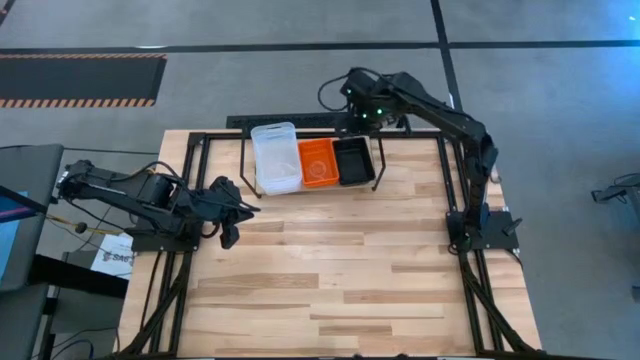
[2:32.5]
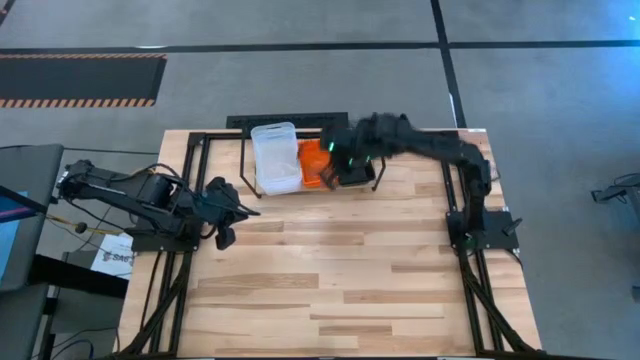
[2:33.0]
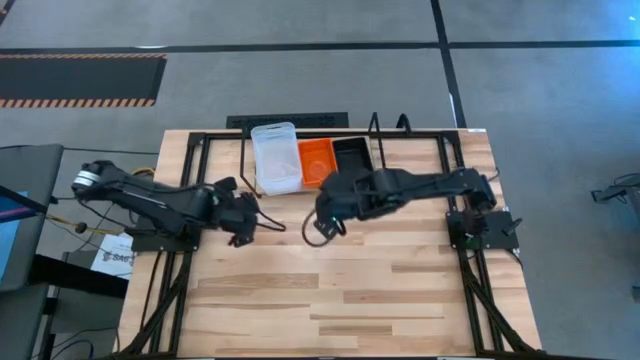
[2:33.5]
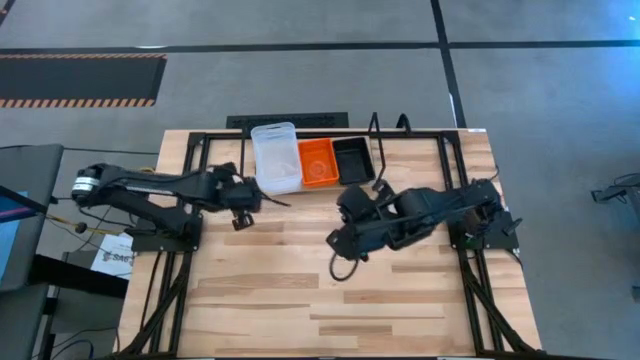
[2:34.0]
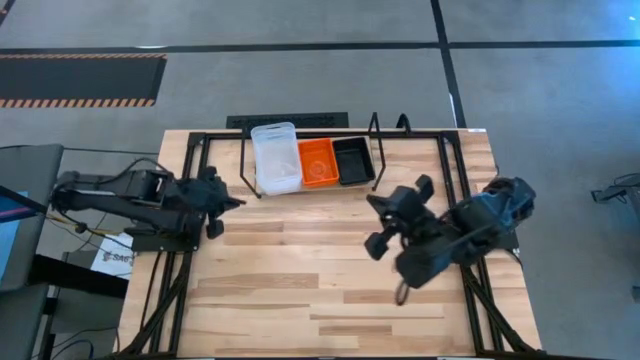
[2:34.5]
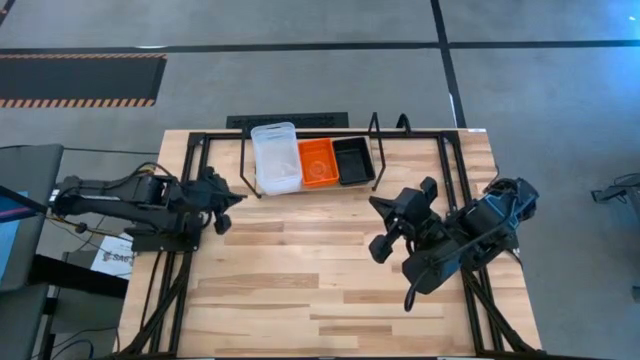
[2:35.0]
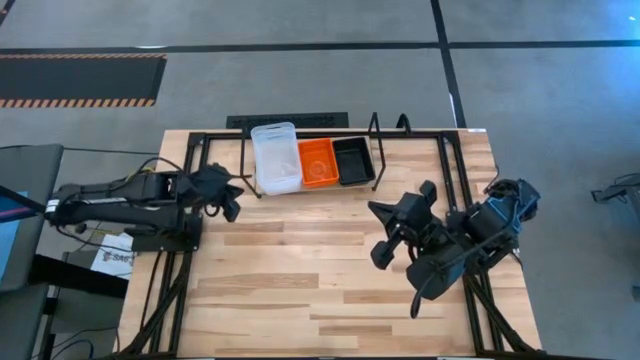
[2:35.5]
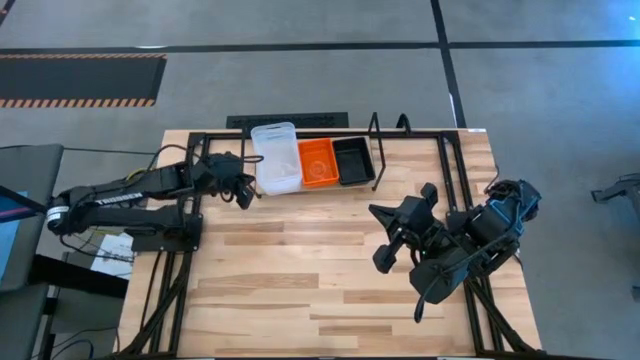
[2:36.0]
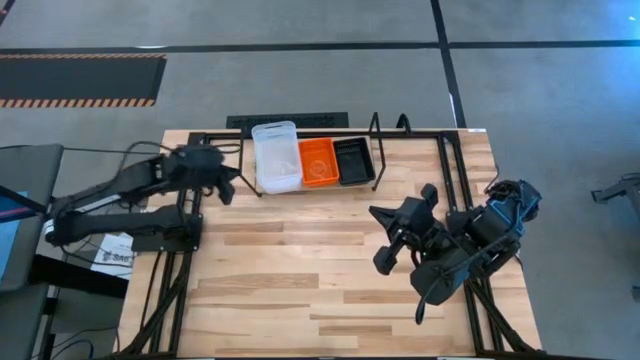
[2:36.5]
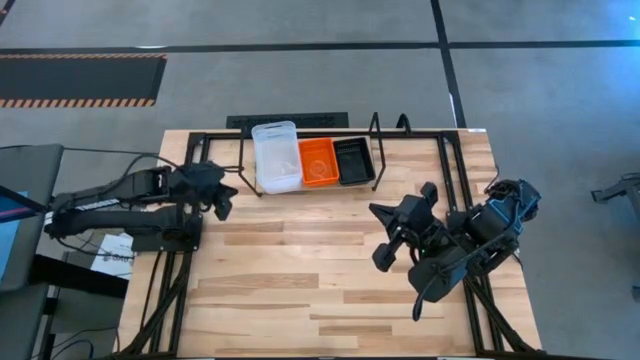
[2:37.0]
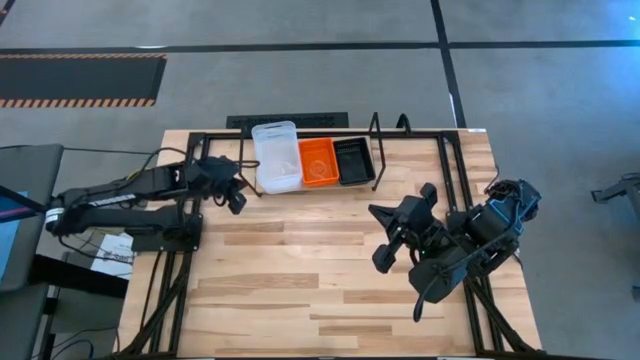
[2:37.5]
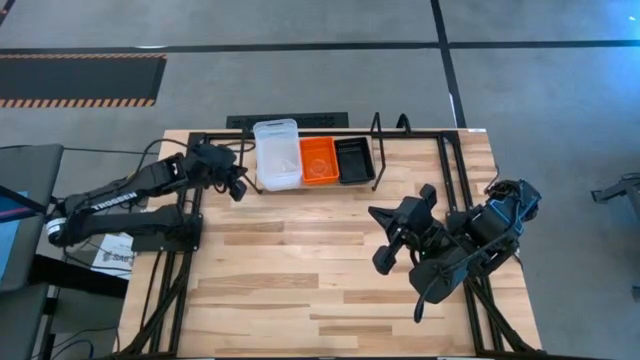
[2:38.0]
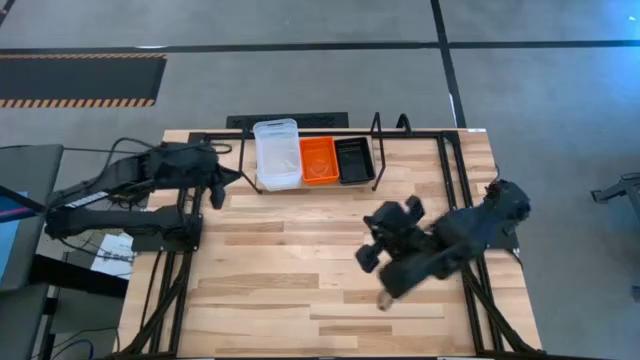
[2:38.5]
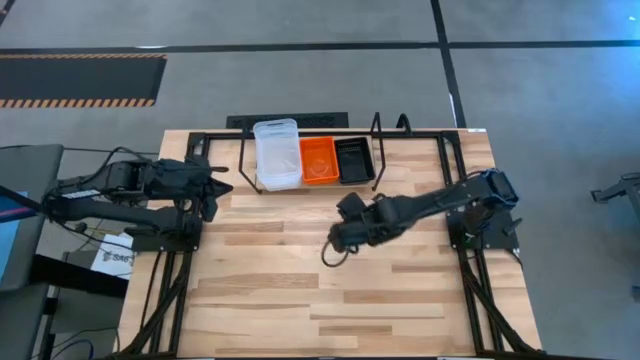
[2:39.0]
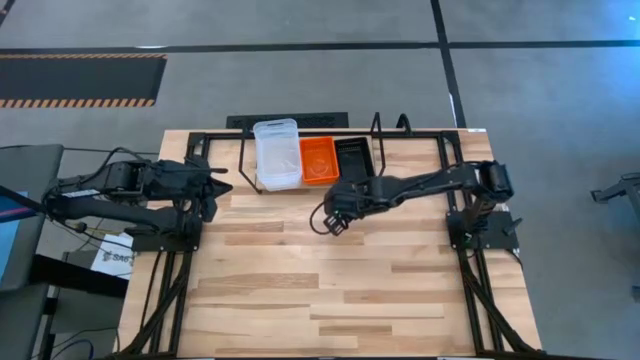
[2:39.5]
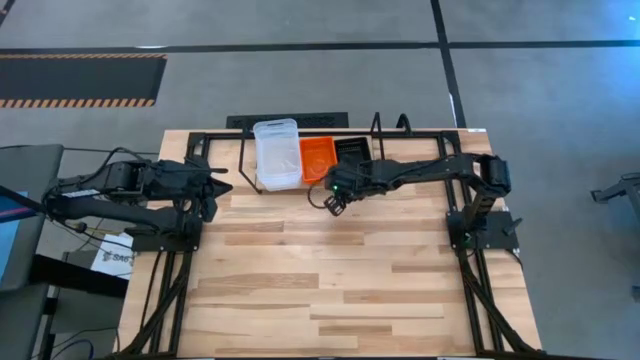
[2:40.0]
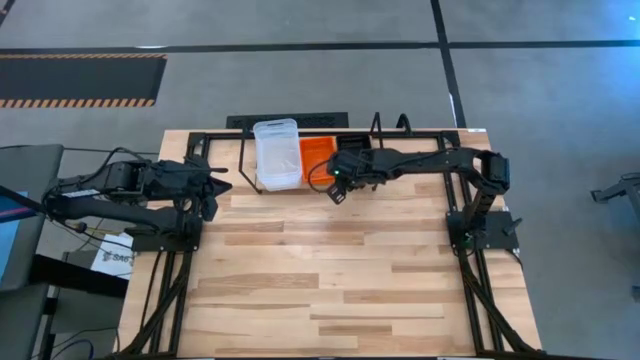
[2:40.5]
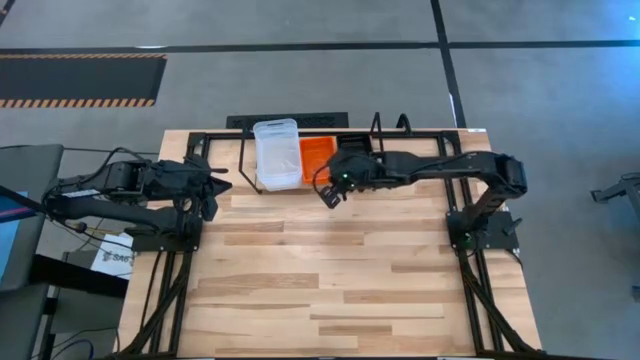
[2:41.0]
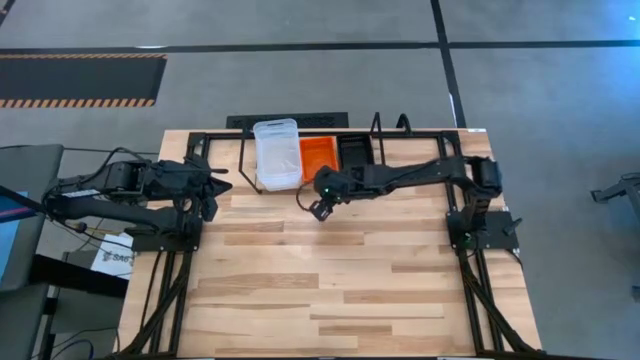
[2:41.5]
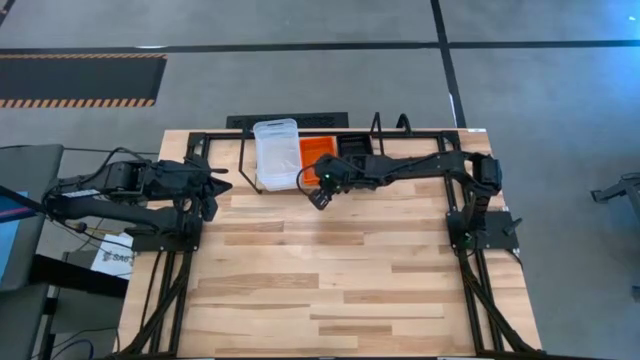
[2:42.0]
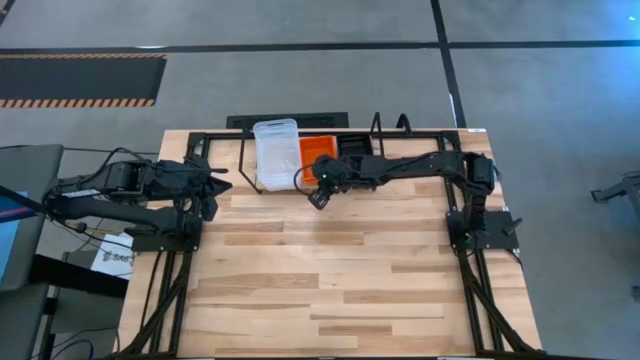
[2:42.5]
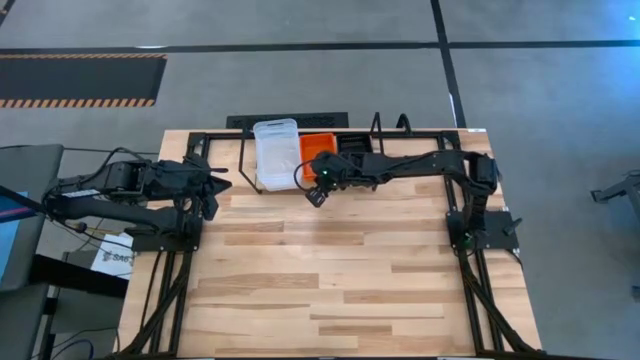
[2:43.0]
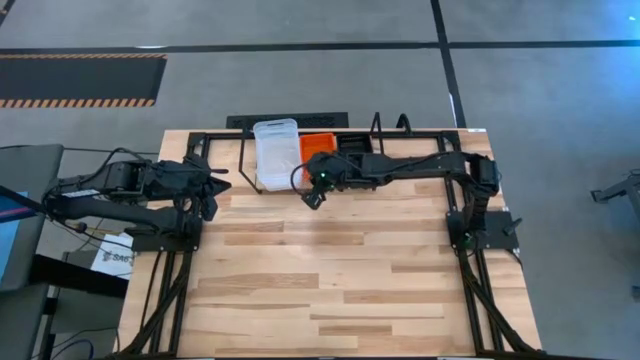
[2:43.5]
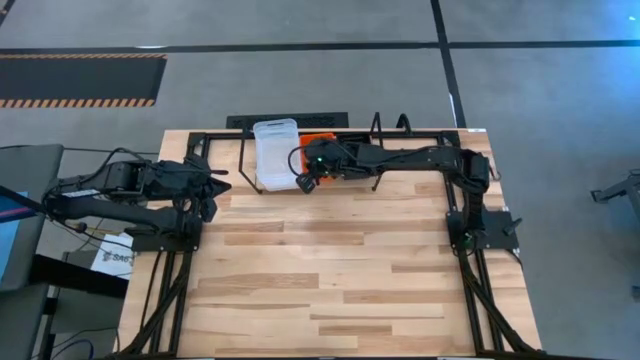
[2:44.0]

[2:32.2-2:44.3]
Task: Stack baskets on shelf by color
Adjust the bins on the shelf

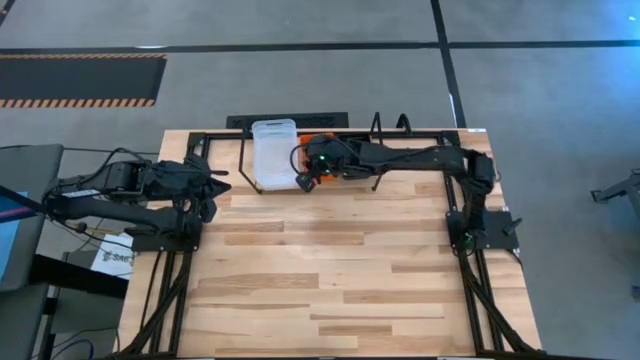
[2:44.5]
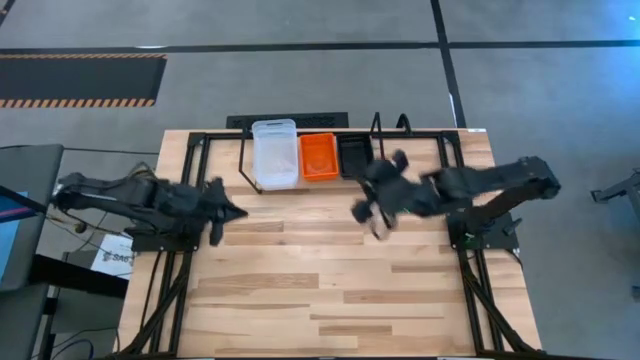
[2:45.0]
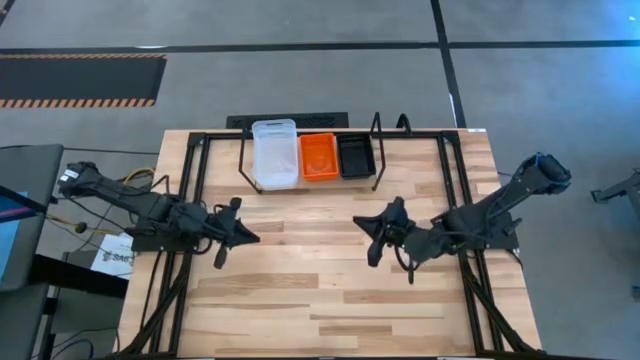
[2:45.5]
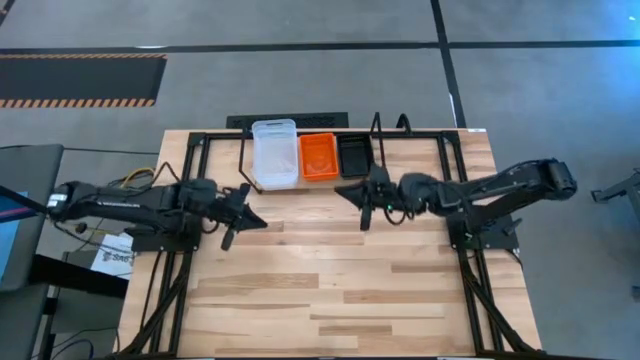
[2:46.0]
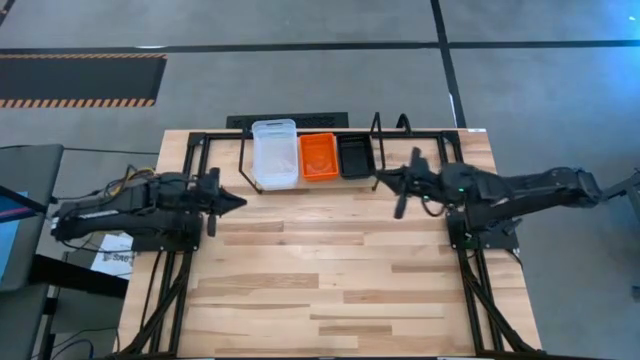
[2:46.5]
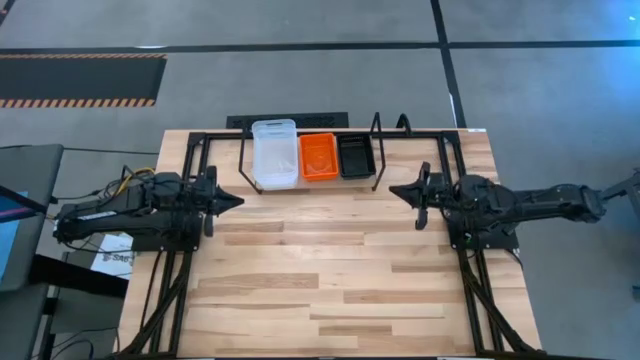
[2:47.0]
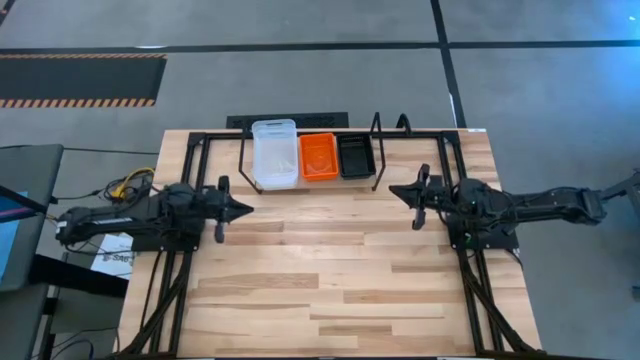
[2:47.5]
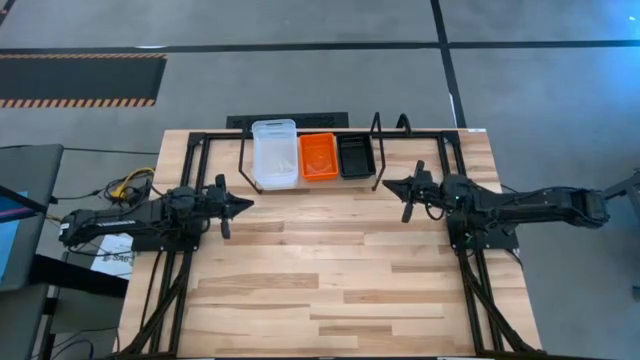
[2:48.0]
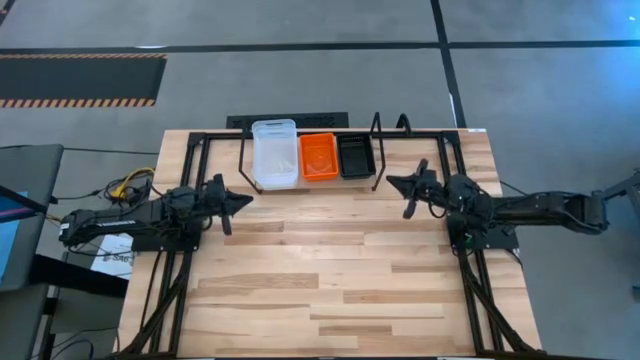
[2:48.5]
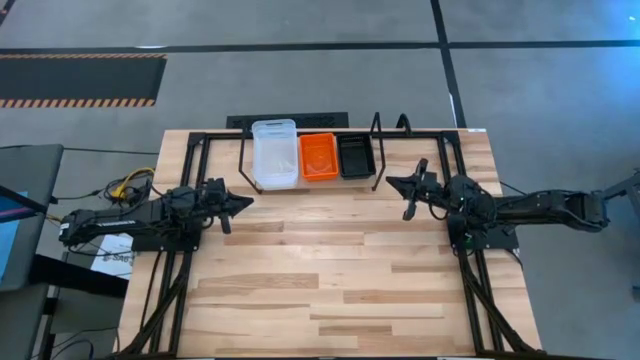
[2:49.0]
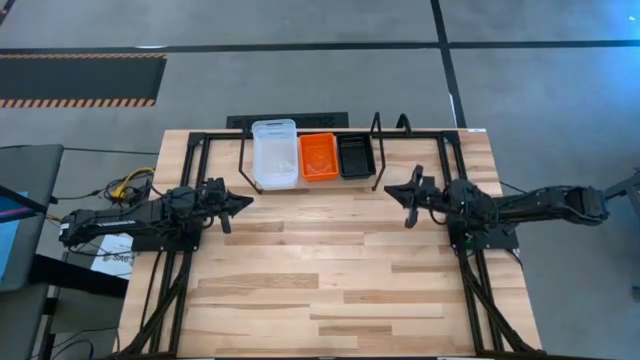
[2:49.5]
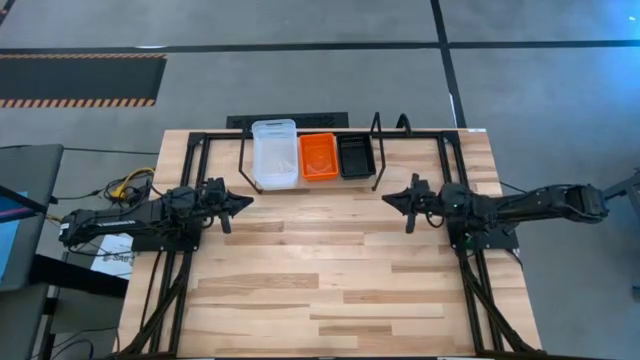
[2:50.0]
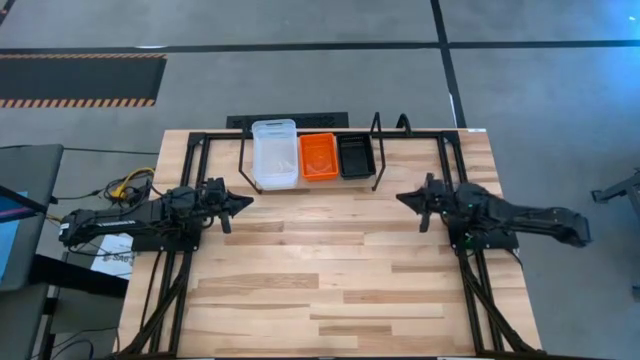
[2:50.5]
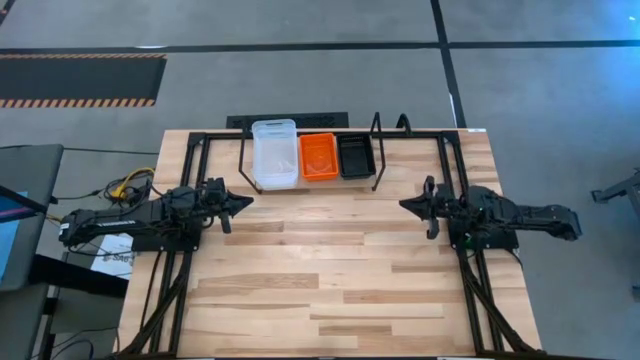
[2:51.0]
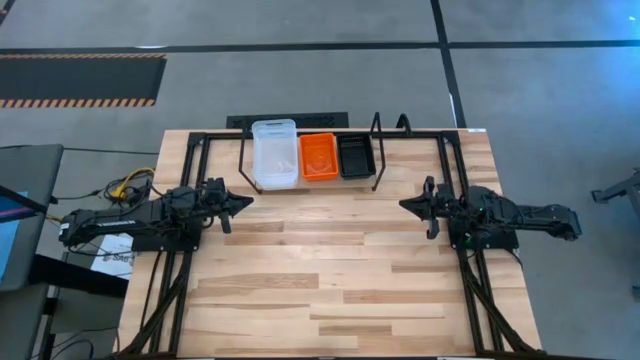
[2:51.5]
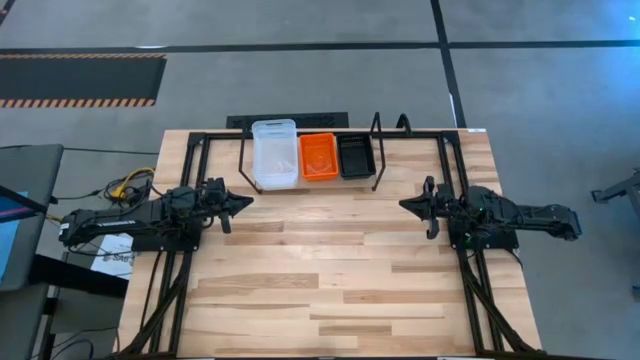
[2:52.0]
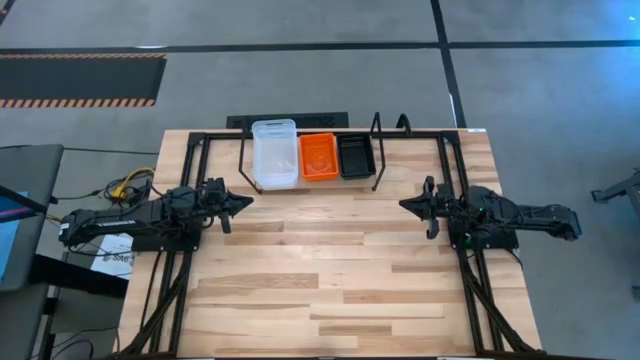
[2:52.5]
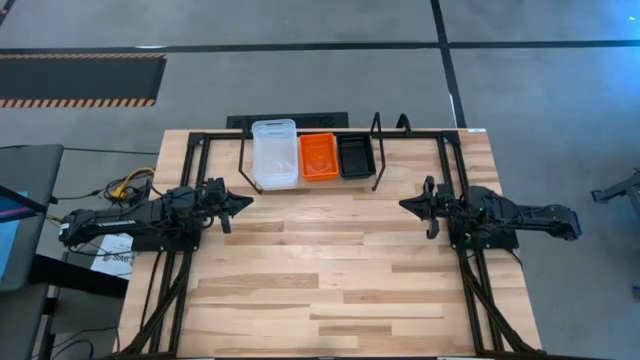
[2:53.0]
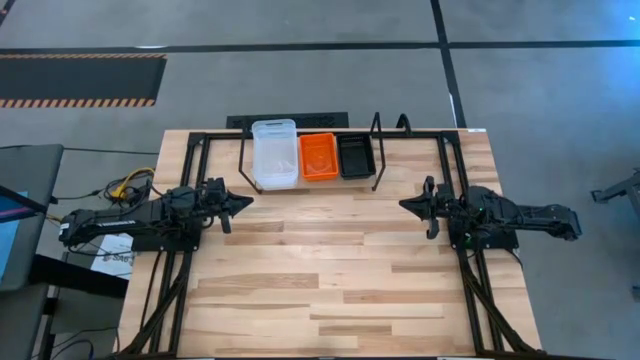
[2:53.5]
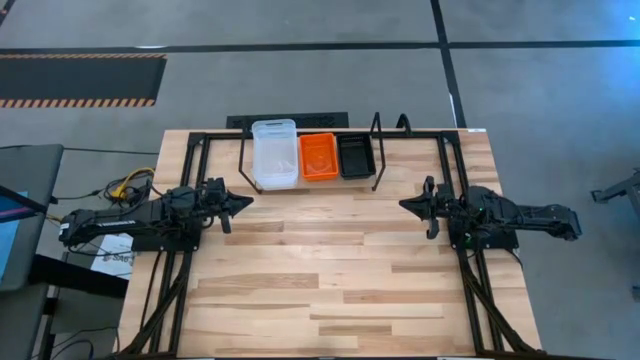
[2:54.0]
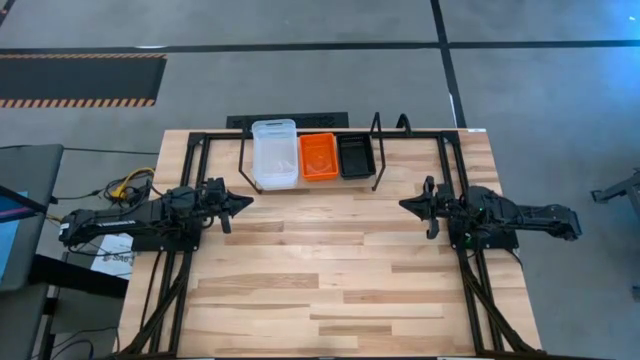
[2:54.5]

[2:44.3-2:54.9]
Return to Home Position
